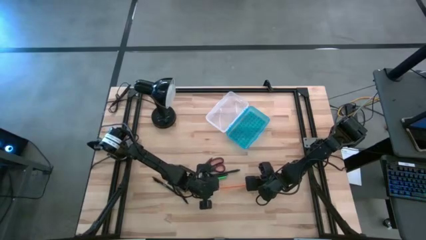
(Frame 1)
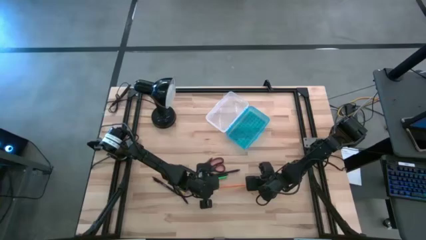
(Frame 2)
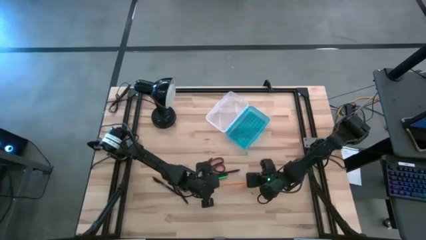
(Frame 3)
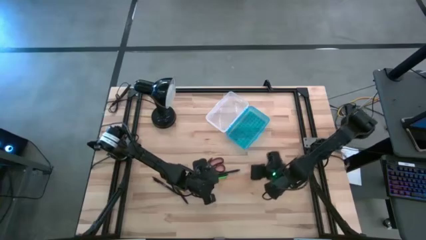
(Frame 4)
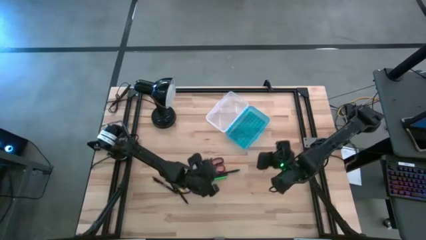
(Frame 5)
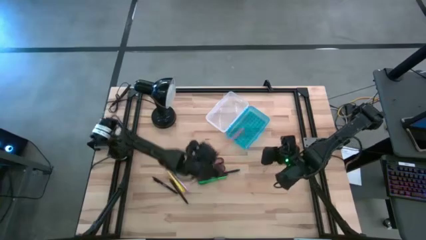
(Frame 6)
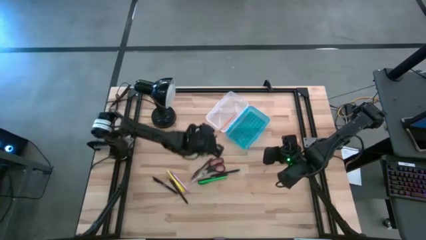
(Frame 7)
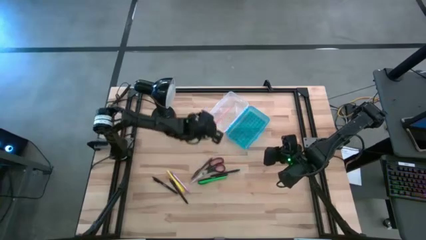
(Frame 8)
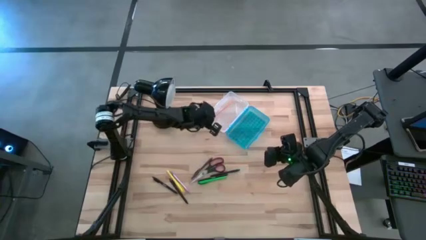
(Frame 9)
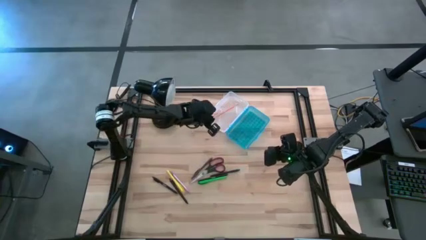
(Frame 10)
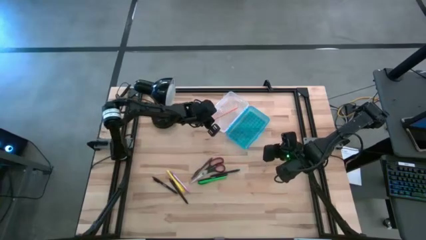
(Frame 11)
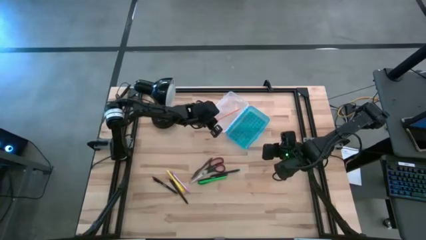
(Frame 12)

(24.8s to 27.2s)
Task: Pick & place school supplies into a supply box
Put the orange pencil into the supply box

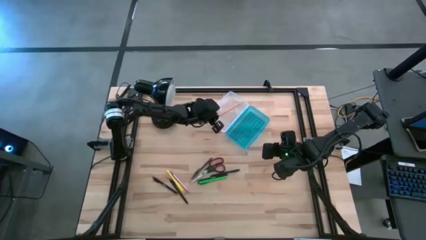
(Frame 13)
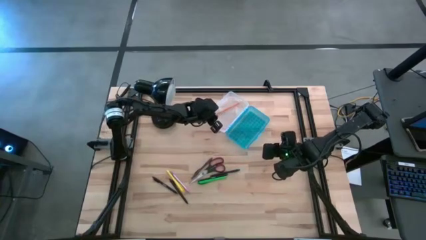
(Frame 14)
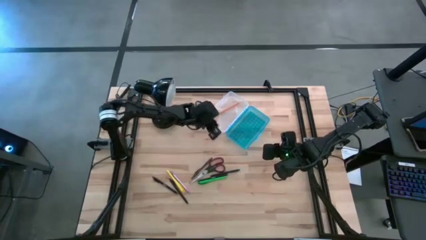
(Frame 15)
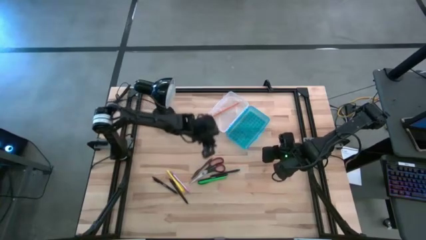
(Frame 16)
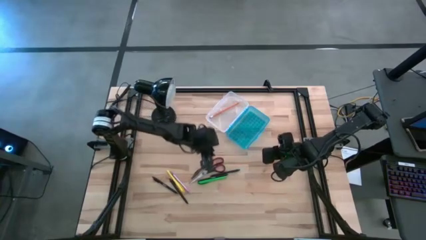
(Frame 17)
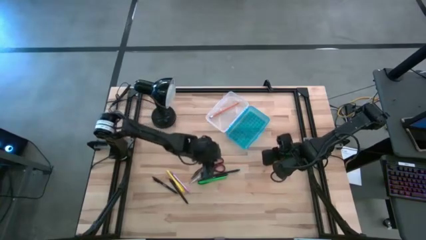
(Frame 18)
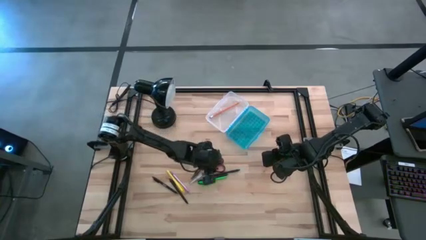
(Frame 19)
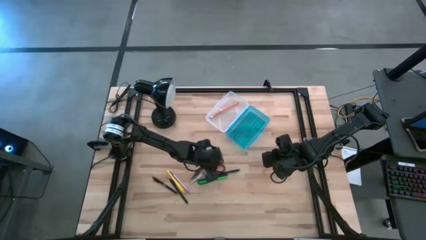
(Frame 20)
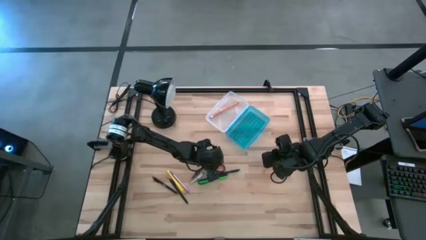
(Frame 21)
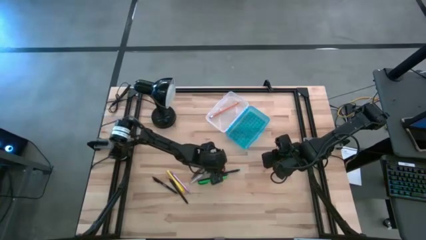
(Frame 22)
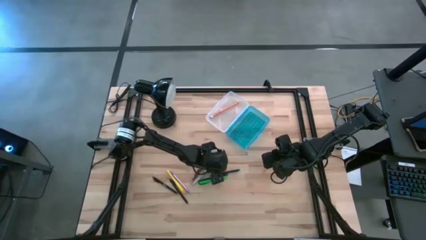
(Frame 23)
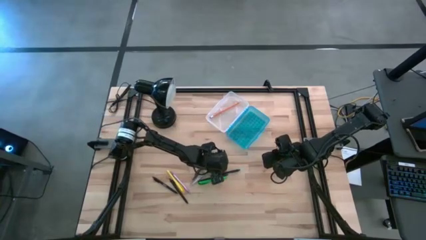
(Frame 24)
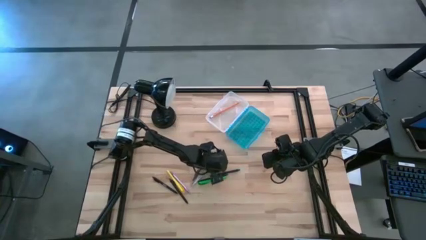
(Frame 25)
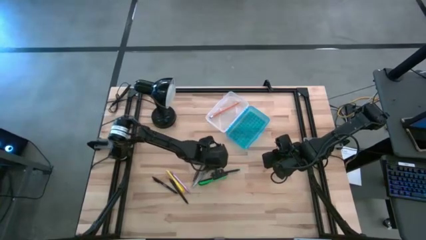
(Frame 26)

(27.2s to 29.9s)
Put the scissors into the supply box

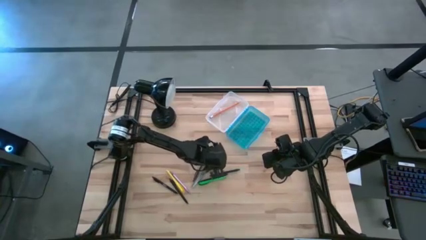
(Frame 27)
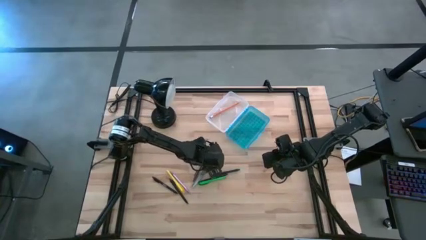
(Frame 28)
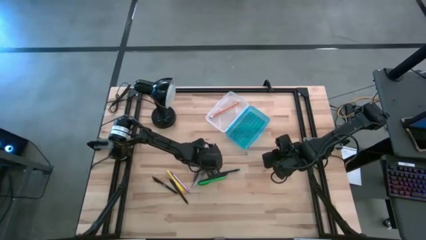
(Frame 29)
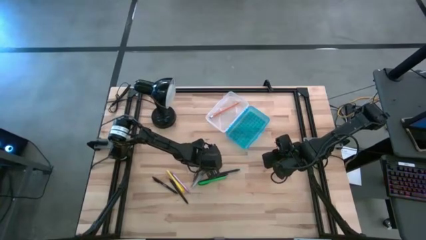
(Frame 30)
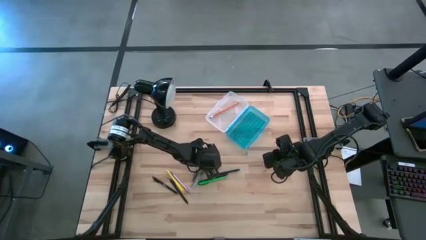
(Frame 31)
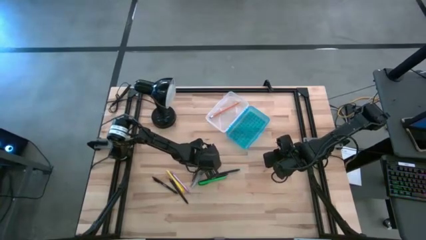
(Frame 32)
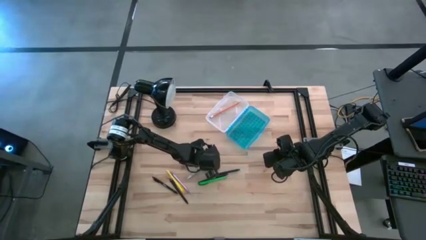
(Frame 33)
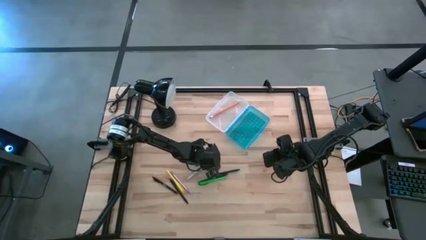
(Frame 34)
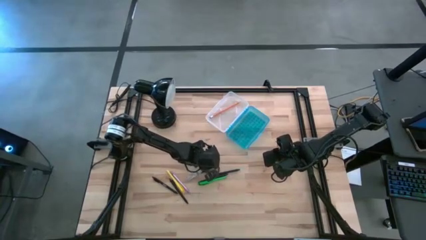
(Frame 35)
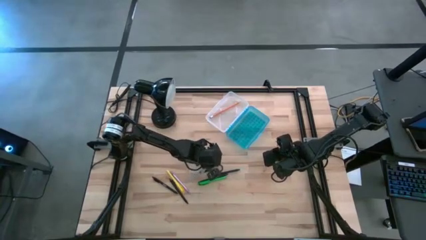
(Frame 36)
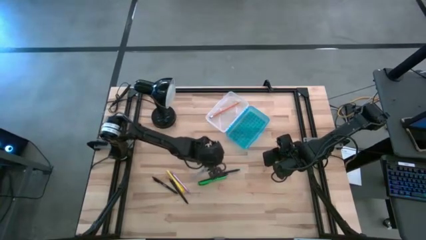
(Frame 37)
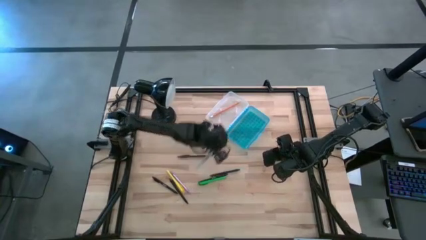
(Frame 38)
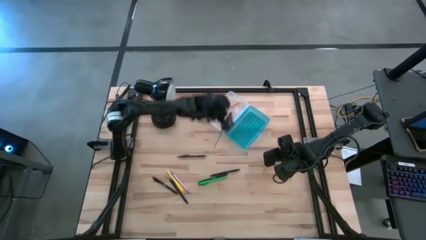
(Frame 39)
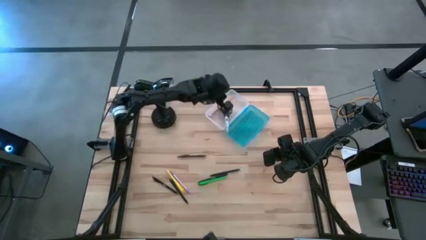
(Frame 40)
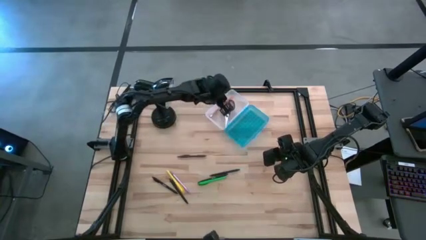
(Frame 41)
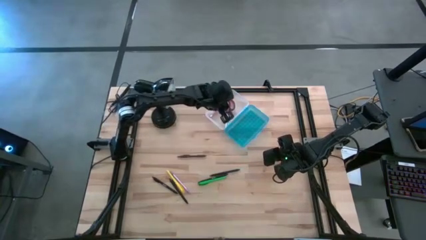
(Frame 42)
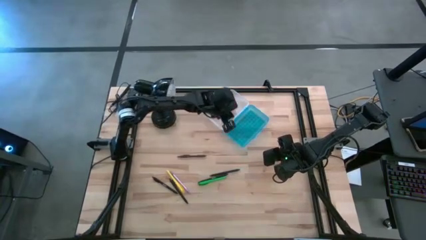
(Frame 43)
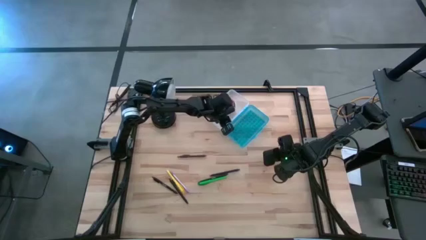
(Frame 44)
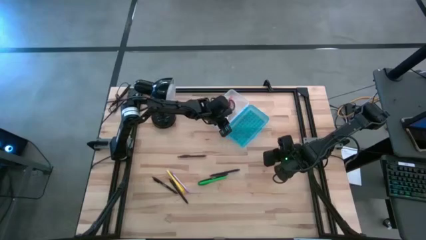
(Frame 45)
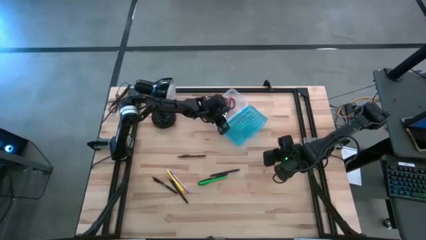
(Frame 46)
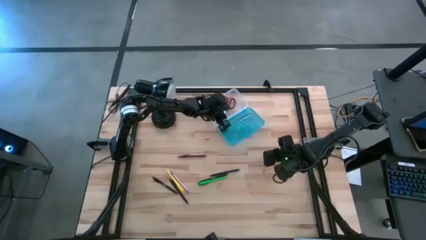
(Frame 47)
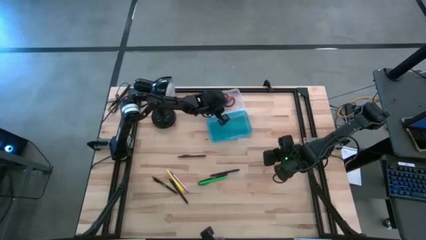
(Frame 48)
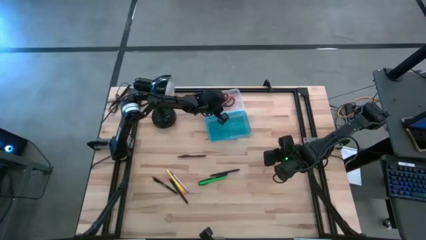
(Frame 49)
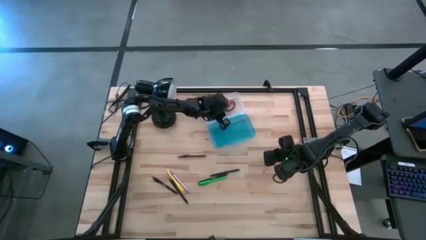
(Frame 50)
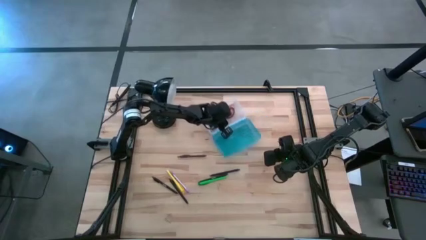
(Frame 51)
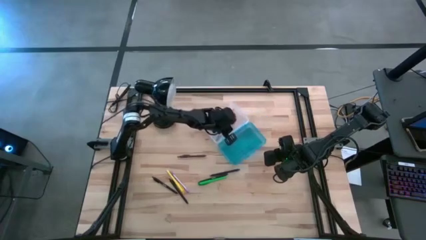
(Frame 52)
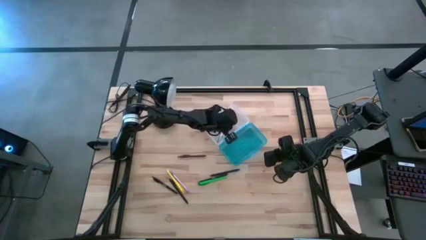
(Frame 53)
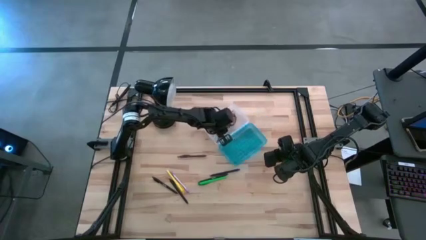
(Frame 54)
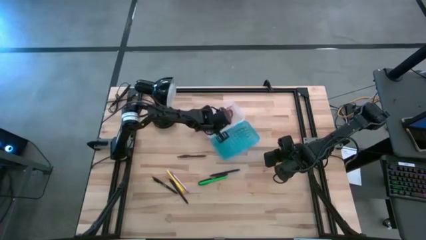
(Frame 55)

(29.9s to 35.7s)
Put the scissors into the supply box

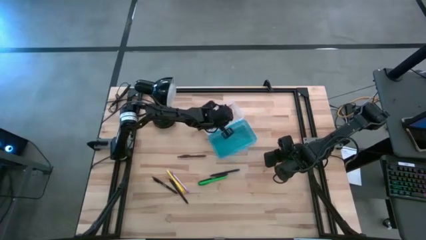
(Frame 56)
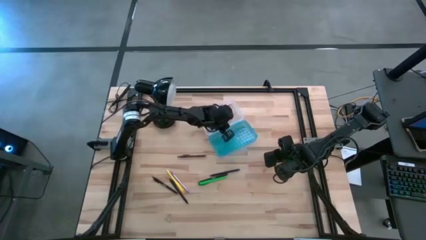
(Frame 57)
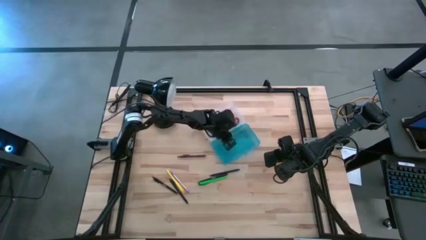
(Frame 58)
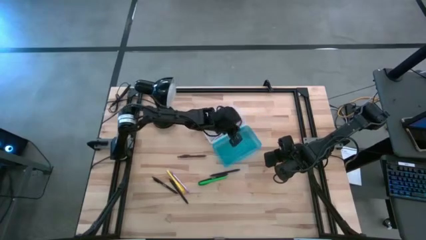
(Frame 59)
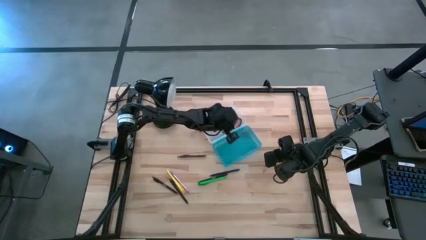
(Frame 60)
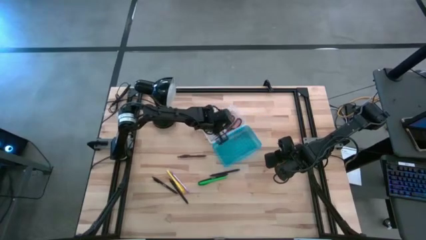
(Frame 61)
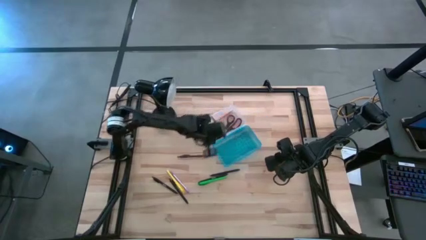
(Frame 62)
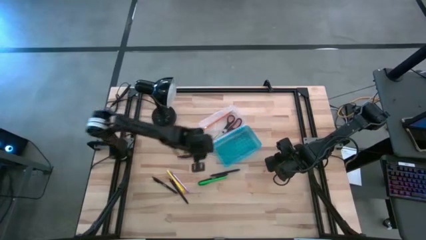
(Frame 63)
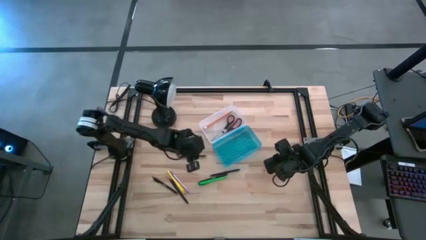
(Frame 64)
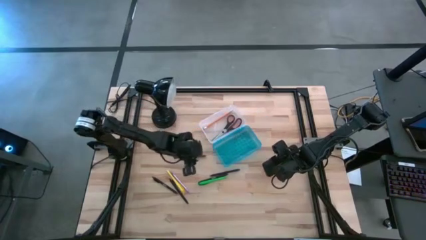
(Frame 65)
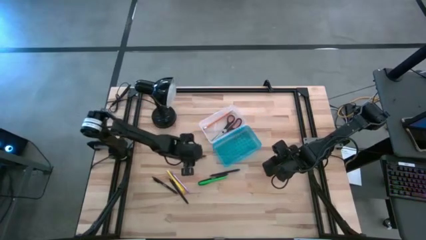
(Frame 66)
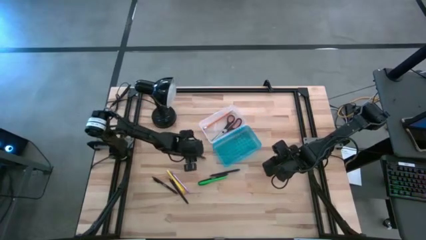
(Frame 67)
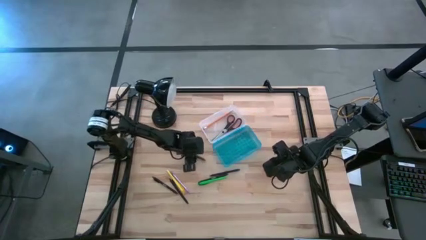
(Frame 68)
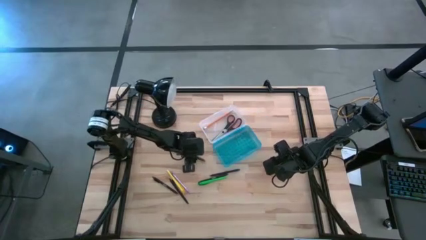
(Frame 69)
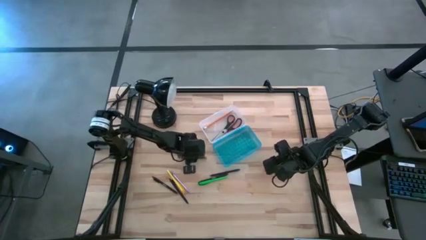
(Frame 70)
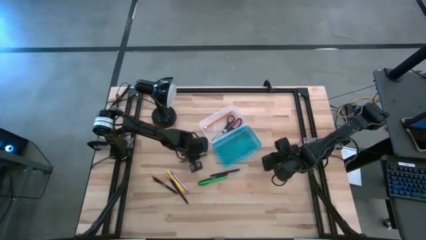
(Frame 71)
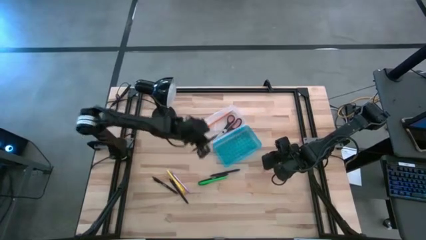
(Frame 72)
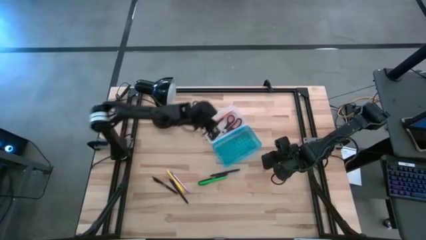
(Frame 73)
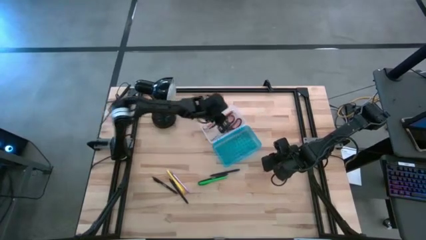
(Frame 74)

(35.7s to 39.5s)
Put the brown pen into the supply box

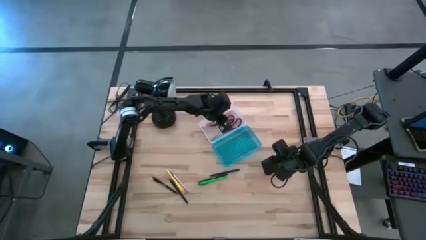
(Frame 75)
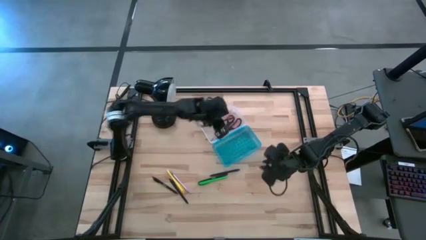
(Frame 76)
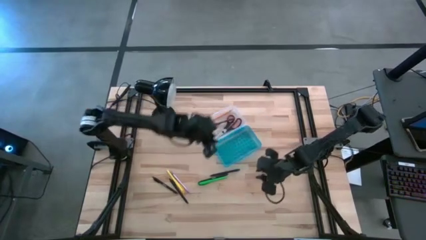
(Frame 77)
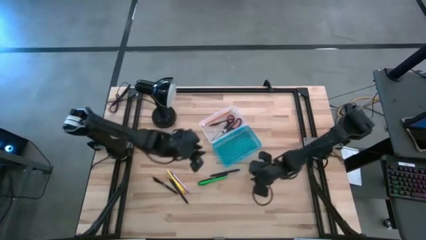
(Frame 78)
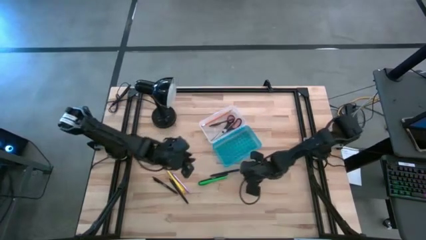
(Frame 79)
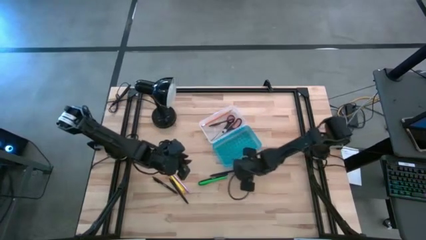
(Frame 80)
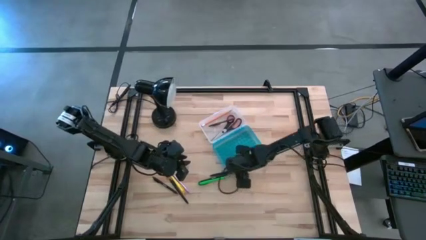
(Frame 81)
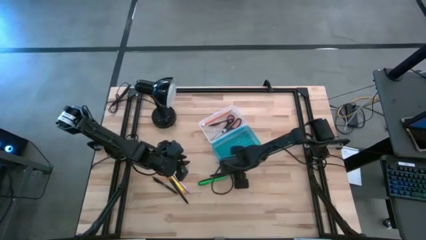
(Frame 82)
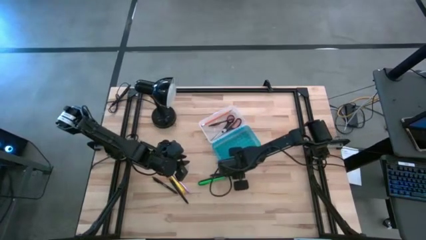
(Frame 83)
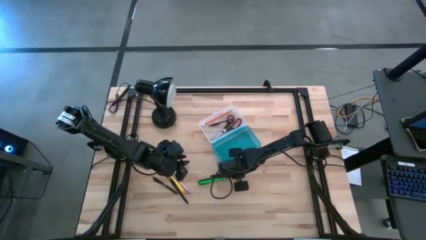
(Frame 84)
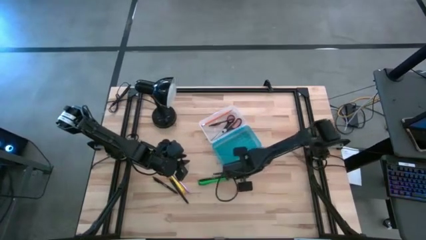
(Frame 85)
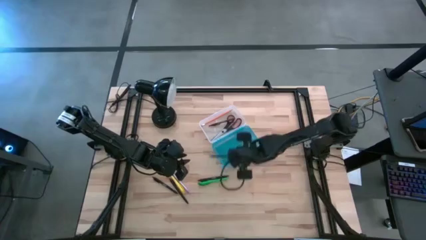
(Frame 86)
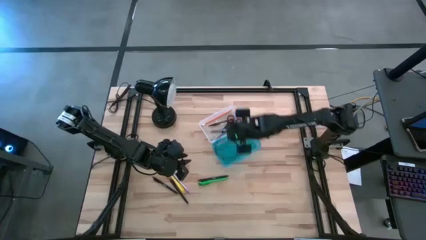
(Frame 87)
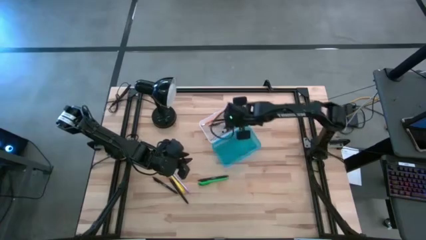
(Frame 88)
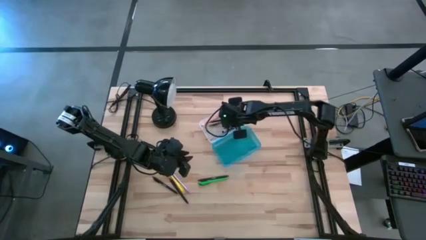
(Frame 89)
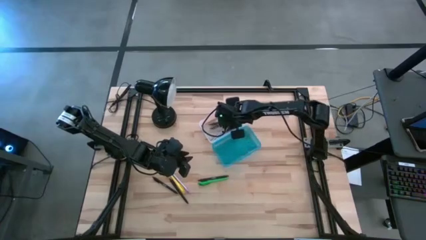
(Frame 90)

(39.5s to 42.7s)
Put the black pen into the supply box
